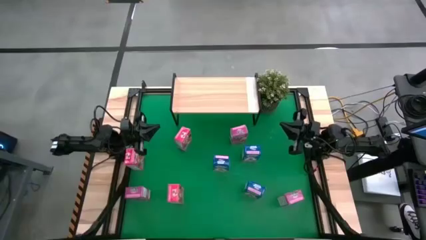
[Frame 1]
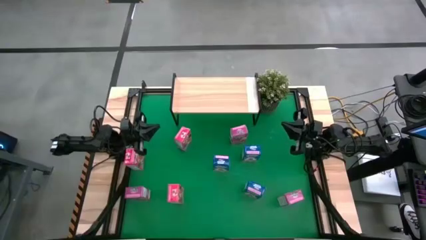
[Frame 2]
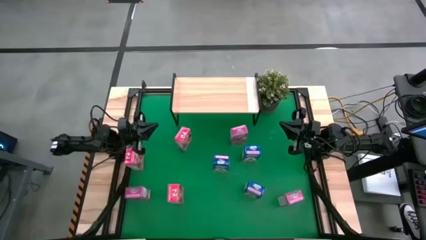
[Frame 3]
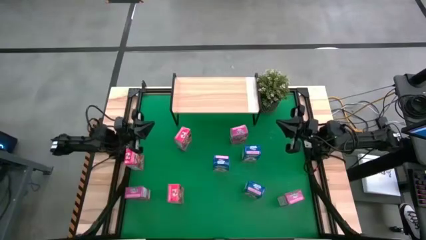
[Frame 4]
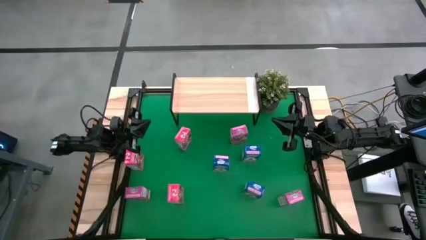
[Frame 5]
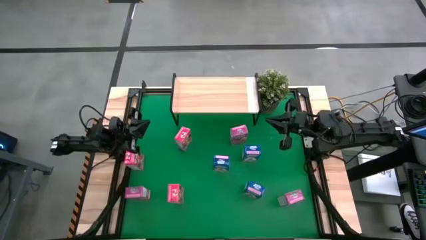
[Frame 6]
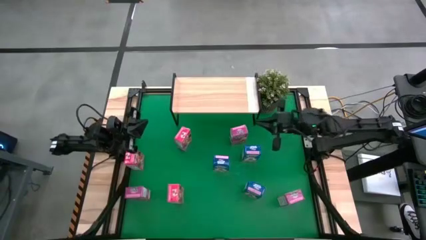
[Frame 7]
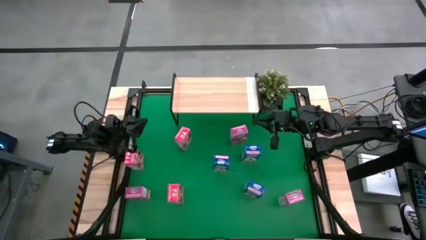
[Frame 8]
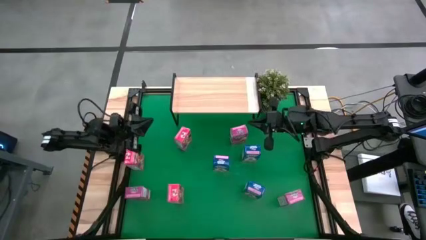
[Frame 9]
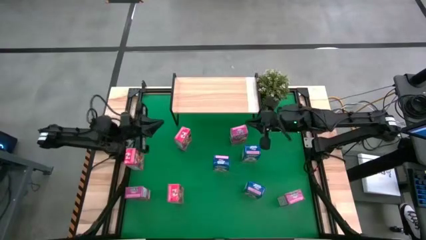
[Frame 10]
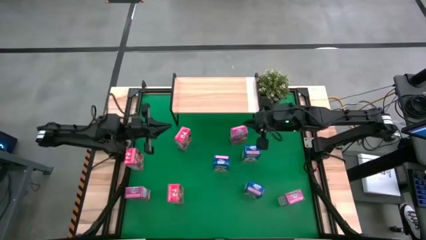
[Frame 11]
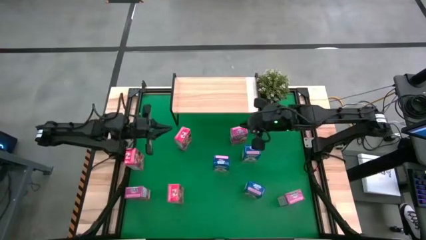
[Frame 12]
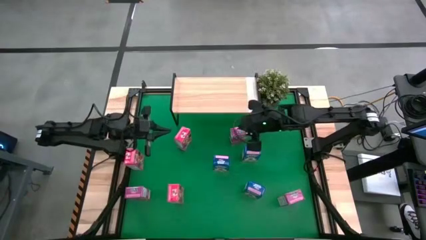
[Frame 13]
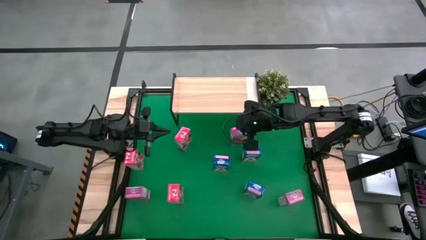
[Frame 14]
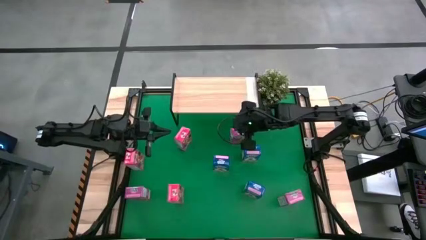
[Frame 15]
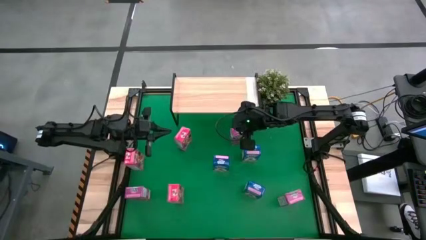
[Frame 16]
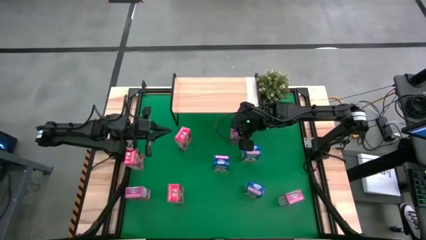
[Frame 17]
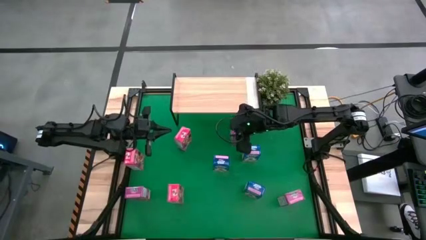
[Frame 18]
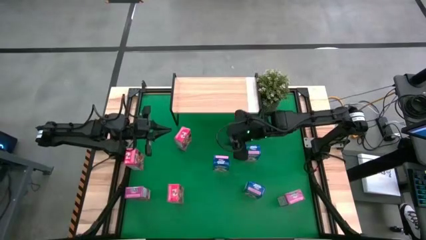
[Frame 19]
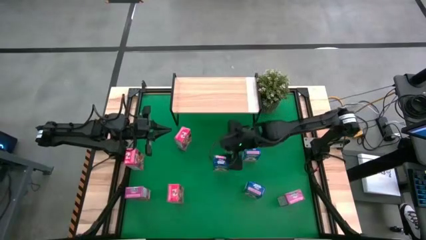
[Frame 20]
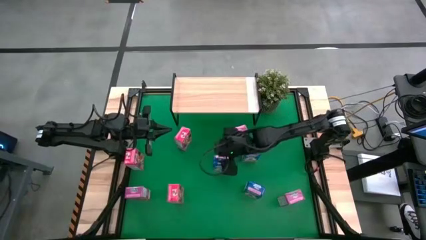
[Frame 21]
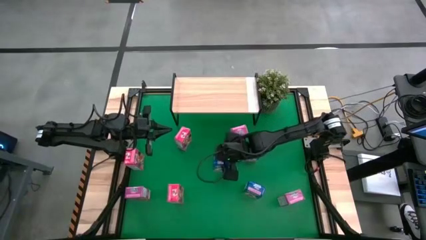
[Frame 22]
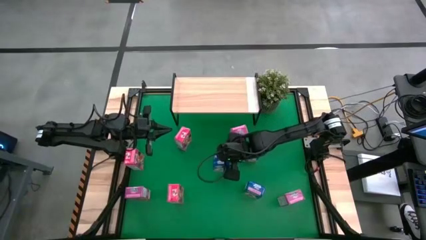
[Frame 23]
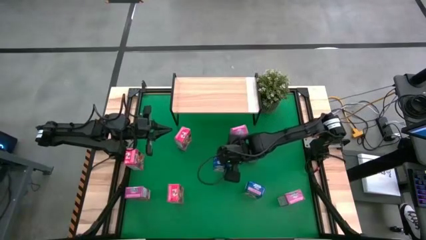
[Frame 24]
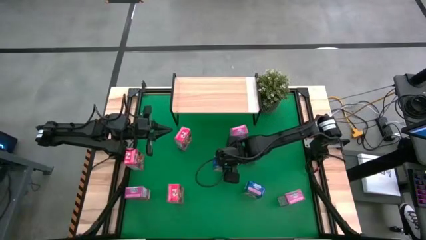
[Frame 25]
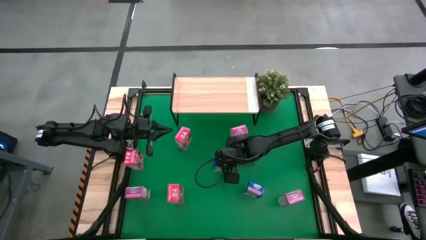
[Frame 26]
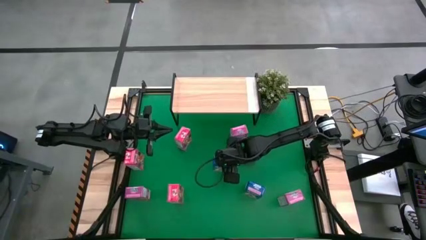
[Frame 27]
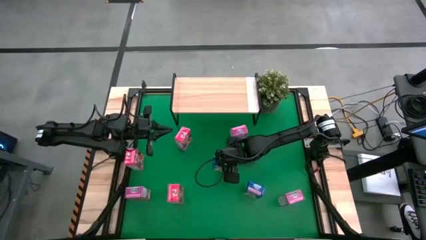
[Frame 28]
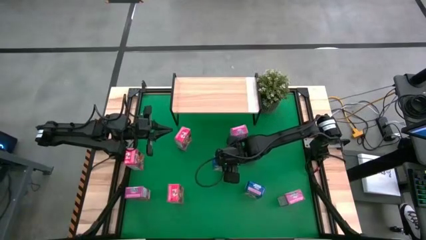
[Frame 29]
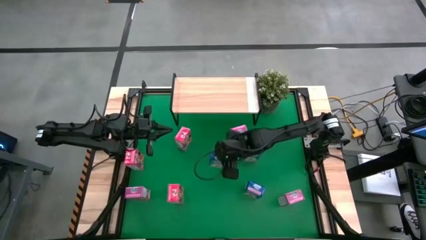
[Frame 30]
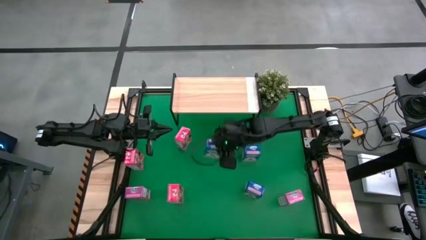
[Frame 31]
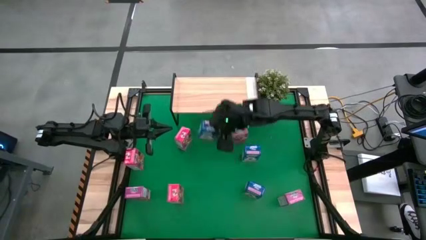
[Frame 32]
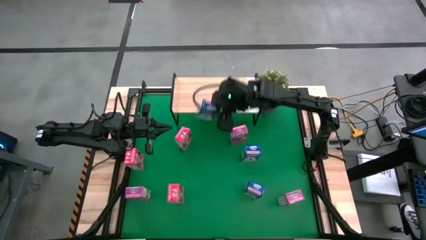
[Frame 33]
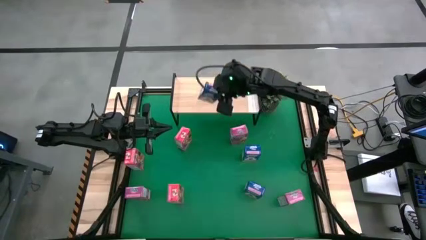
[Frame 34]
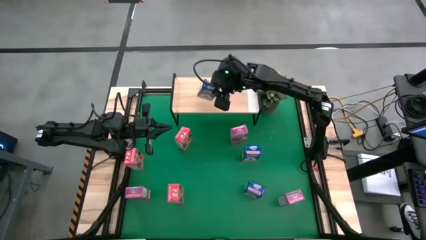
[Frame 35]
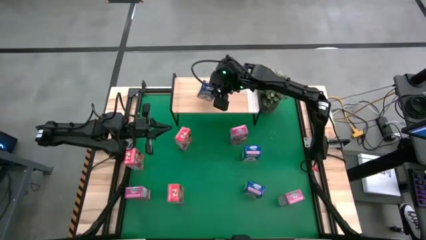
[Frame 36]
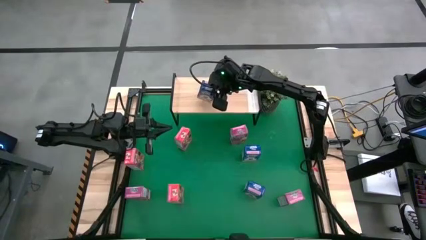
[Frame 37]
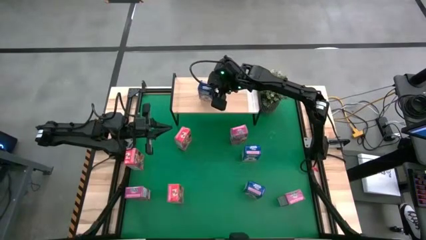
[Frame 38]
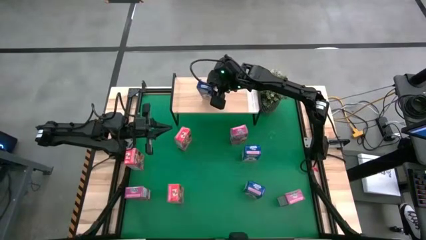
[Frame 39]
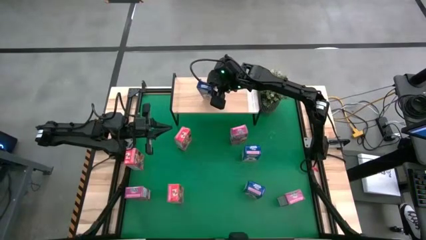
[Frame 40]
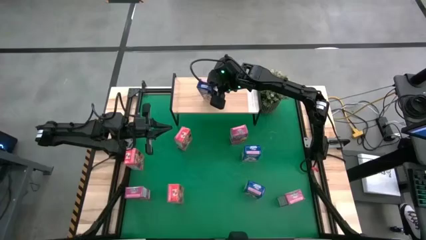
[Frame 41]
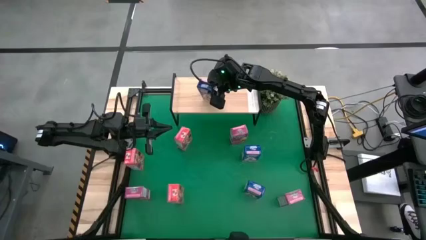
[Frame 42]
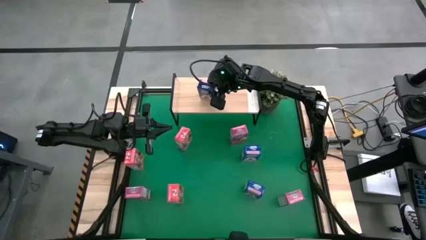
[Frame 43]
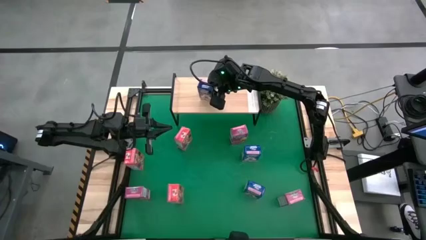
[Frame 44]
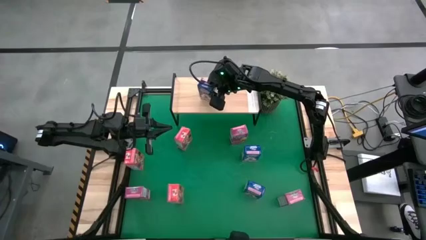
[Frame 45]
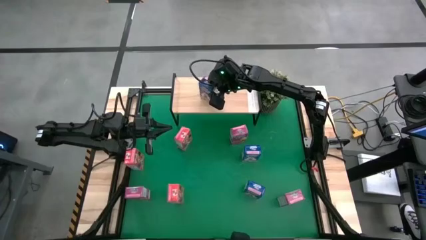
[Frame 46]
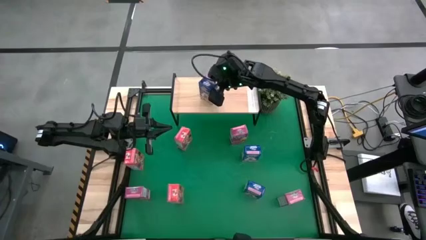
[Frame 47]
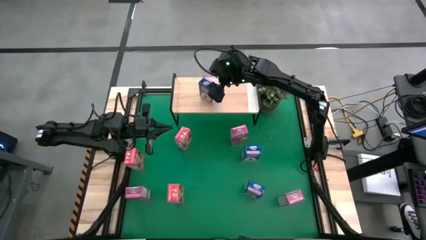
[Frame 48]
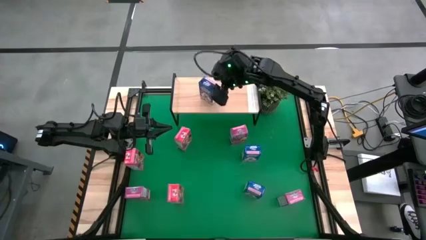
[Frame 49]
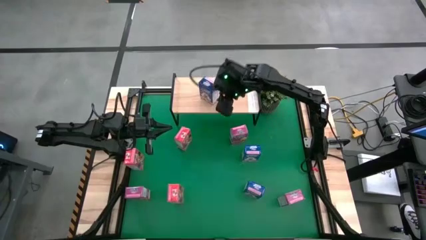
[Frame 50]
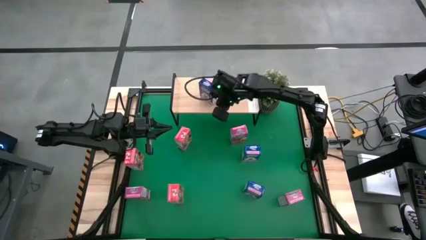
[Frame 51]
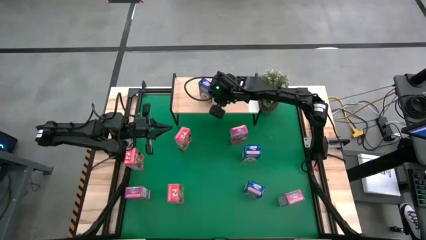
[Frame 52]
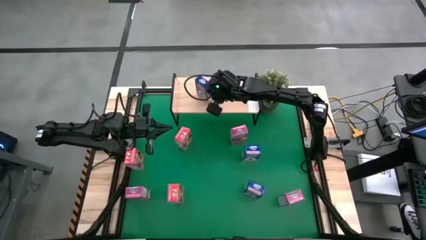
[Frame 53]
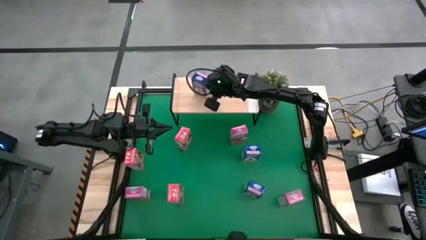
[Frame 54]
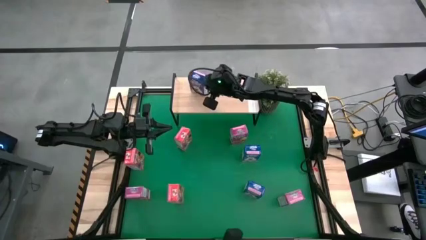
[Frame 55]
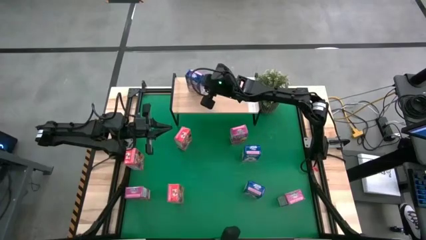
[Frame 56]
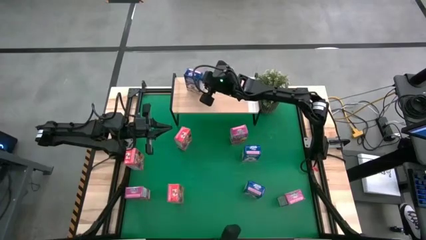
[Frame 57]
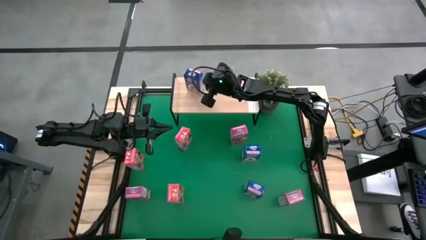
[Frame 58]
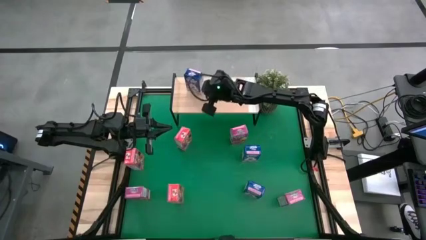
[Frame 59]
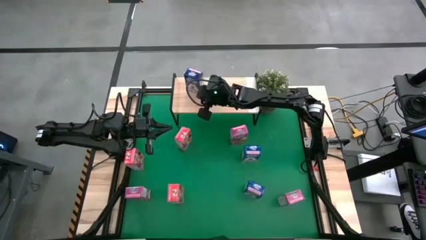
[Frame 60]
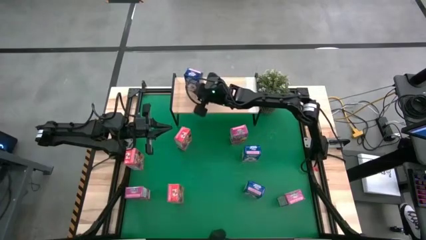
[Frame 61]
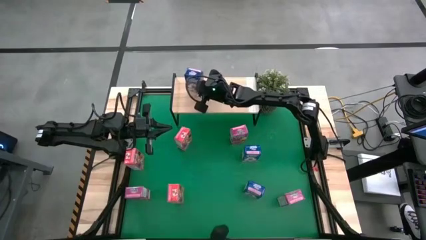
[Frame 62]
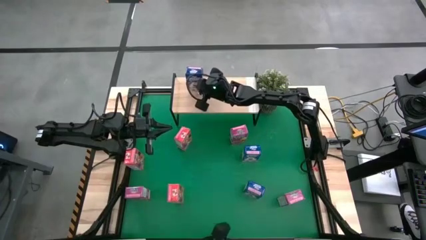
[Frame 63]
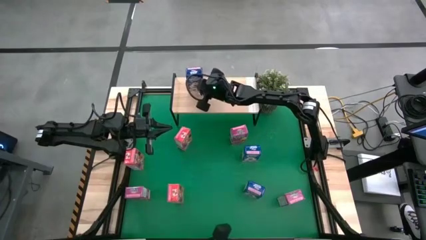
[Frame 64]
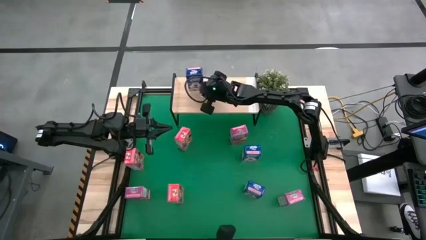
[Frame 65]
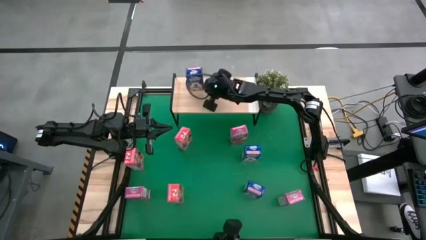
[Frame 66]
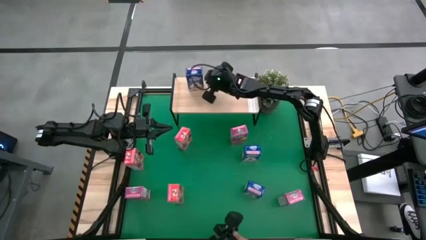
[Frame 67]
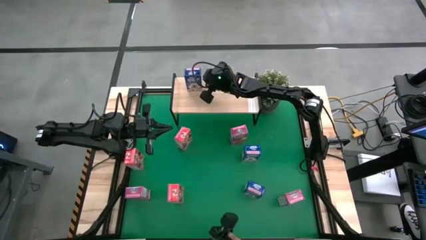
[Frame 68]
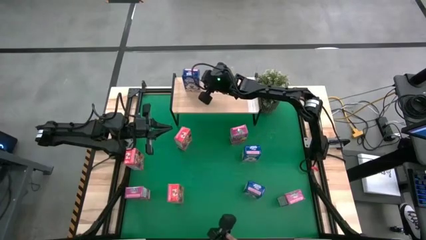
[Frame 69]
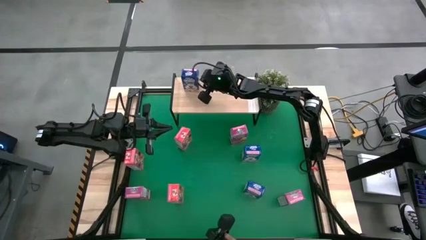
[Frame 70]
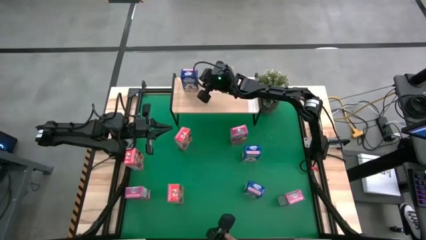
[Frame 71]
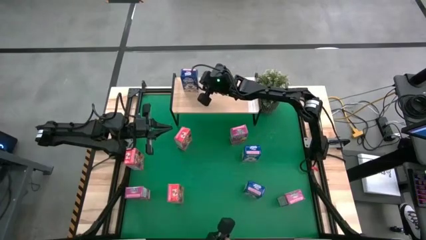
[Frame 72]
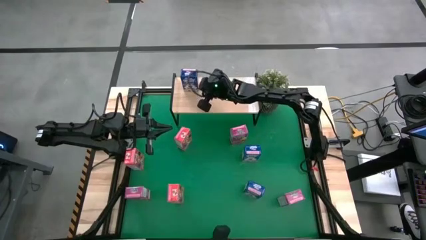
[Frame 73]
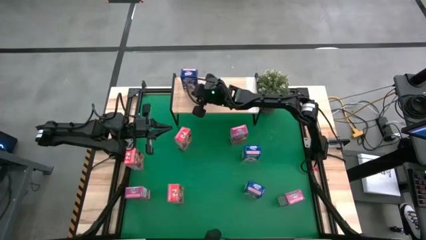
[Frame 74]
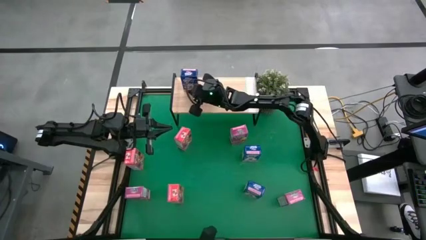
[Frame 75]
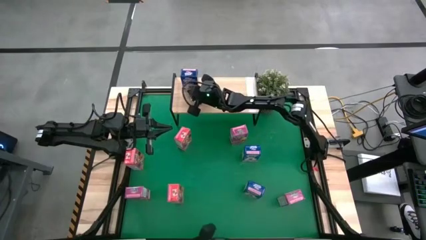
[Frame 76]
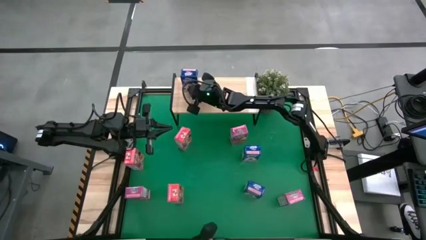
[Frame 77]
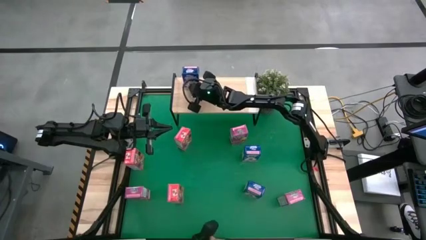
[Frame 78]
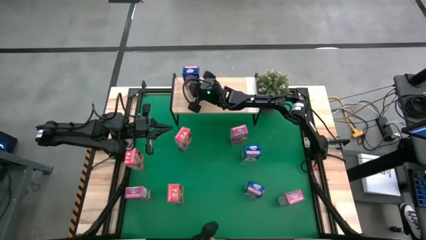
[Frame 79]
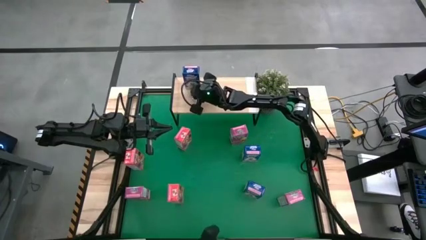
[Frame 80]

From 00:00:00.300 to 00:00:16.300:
Task: Stack cereal on shelf
Put the middle left blue cereal box on the shelf
